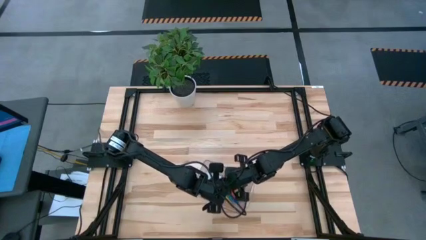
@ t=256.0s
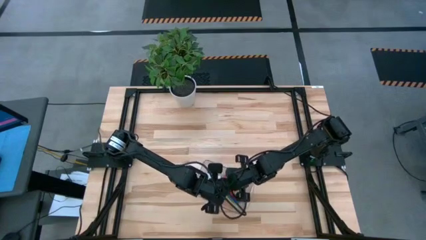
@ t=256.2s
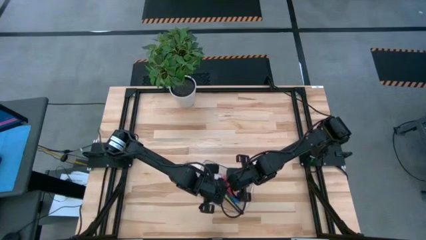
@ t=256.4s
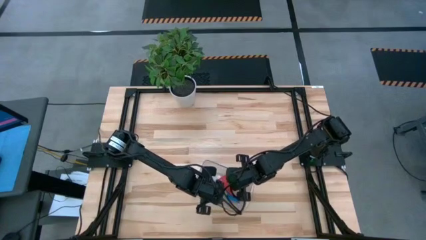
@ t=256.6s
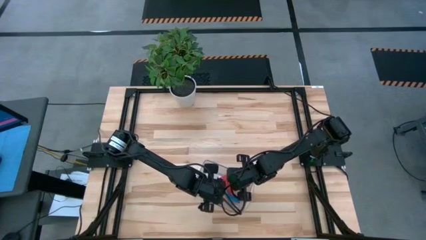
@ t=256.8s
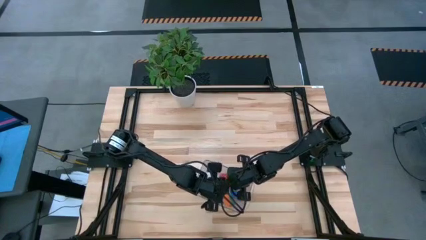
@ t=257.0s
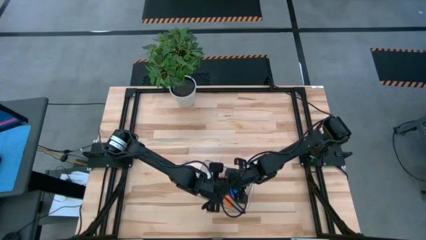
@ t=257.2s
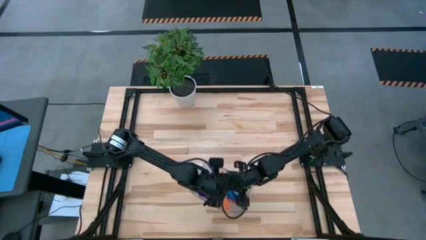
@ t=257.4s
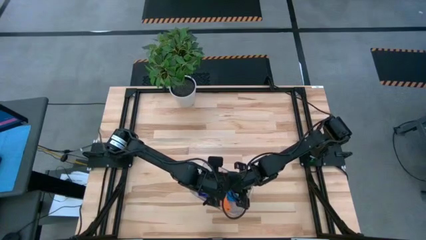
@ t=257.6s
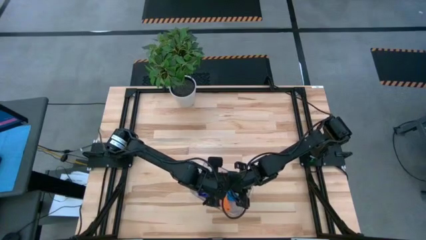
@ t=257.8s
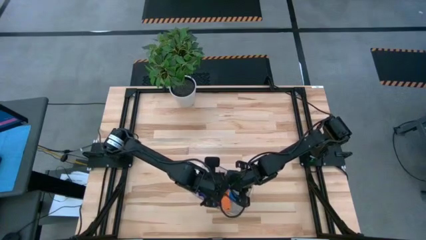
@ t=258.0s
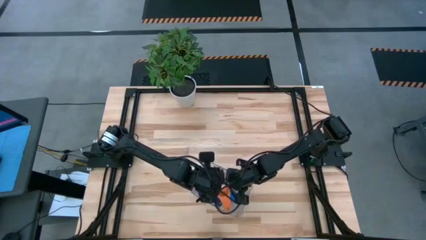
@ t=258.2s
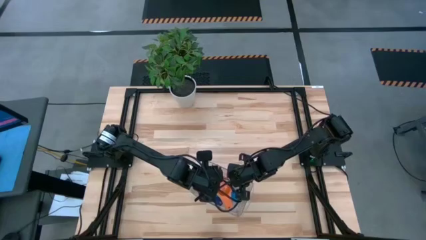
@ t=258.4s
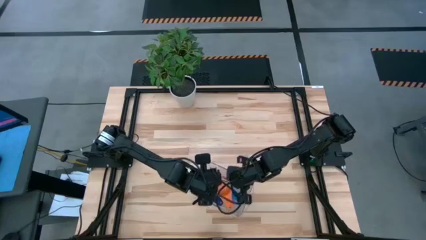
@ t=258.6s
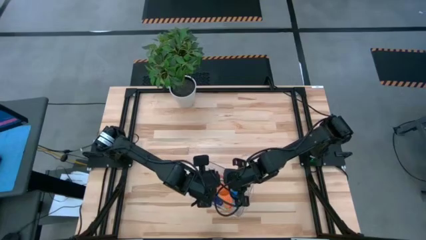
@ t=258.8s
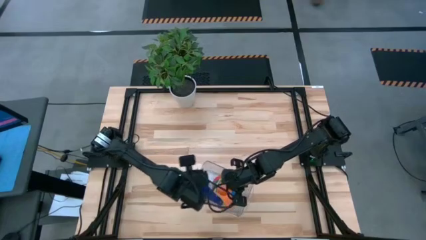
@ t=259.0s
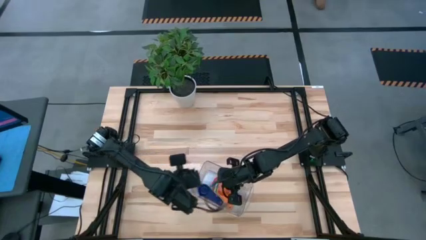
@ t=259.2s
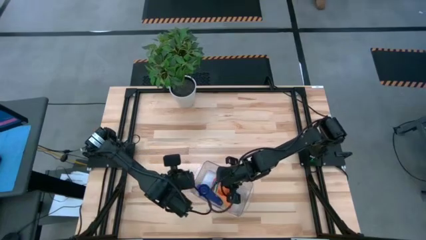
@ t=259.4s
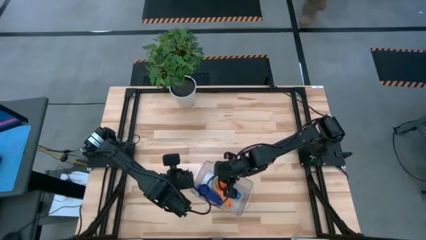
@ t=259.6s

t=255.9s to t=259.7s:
Task: Nest measuring cups in basket
Put the colored stacked measuring cups into the transparent bin

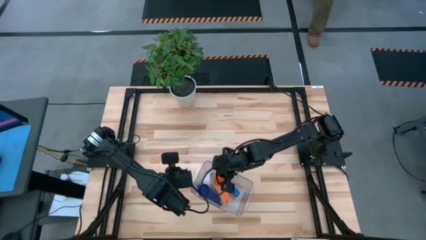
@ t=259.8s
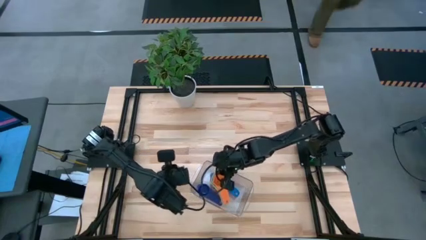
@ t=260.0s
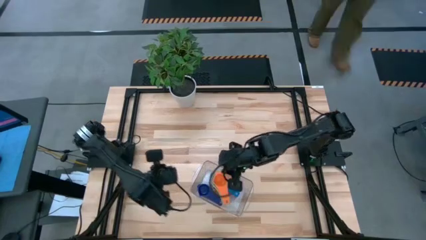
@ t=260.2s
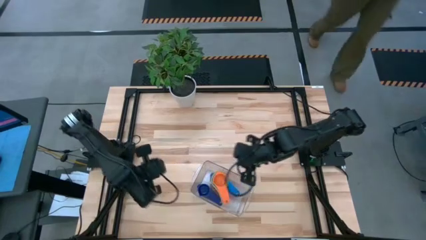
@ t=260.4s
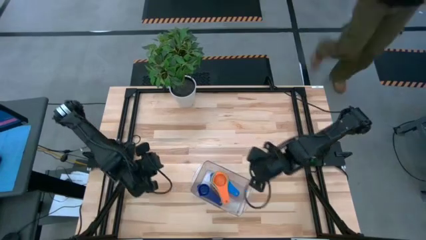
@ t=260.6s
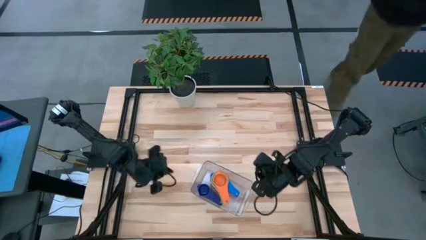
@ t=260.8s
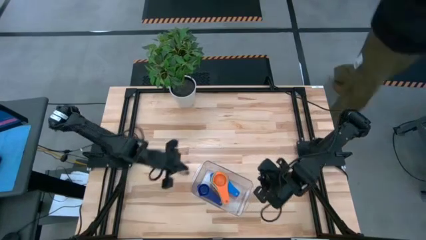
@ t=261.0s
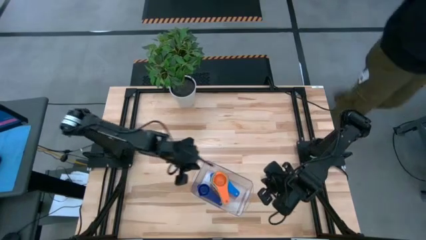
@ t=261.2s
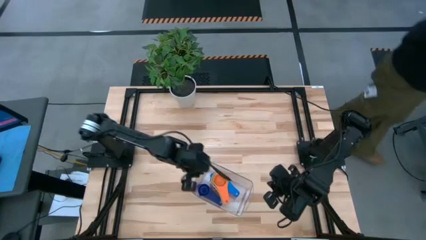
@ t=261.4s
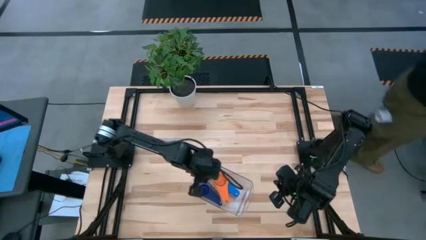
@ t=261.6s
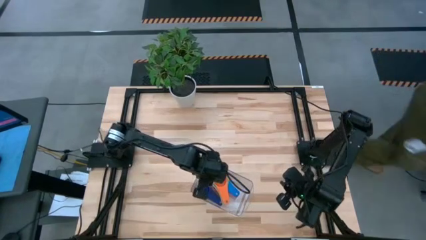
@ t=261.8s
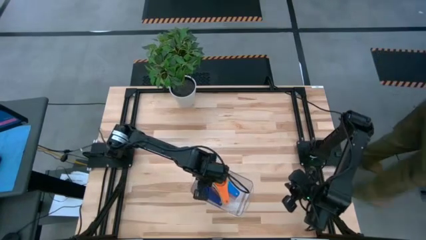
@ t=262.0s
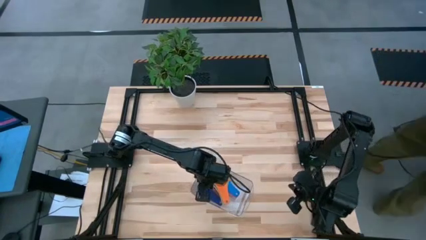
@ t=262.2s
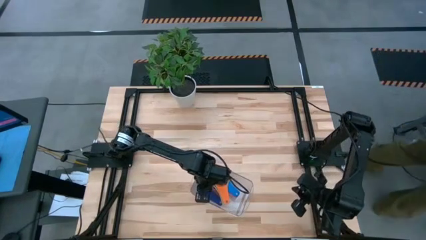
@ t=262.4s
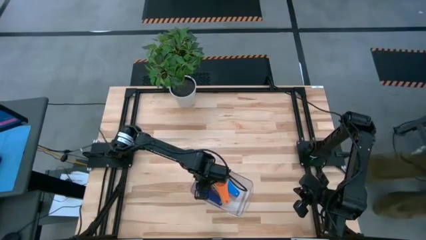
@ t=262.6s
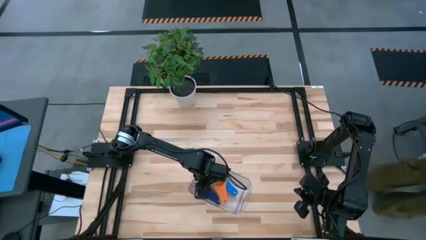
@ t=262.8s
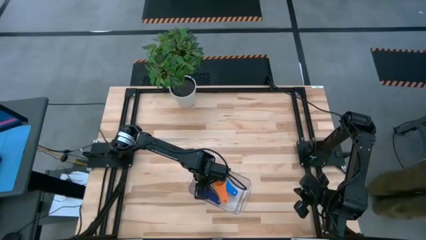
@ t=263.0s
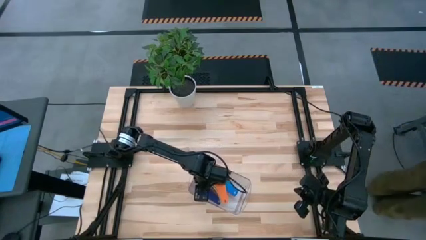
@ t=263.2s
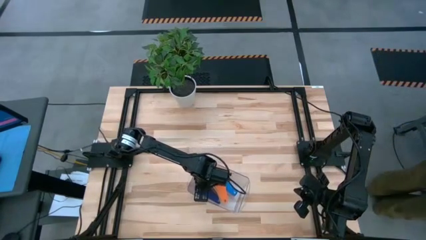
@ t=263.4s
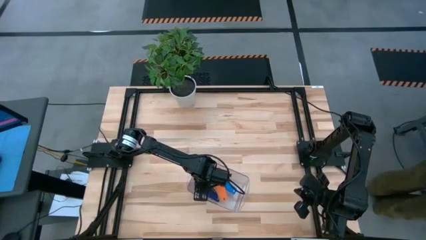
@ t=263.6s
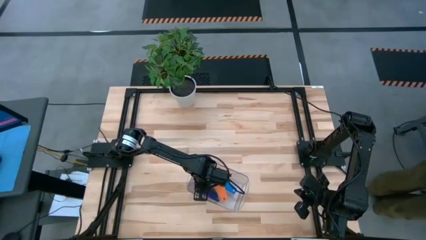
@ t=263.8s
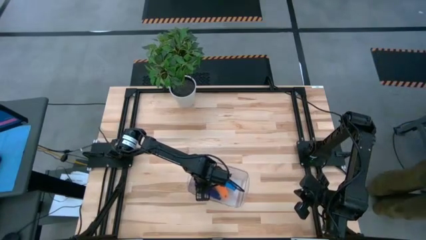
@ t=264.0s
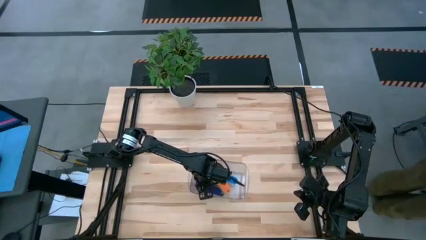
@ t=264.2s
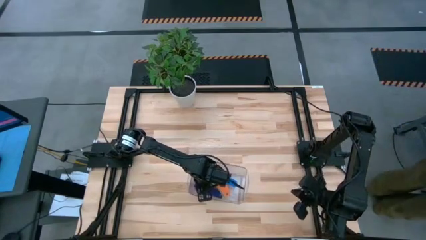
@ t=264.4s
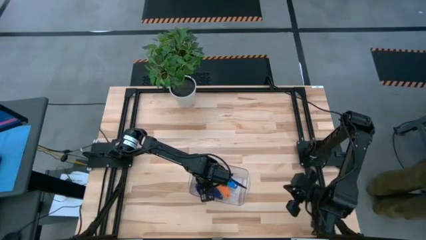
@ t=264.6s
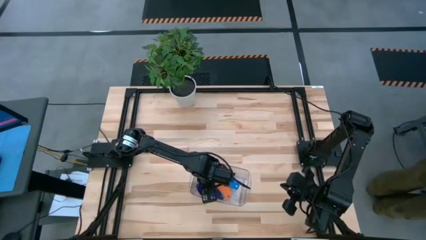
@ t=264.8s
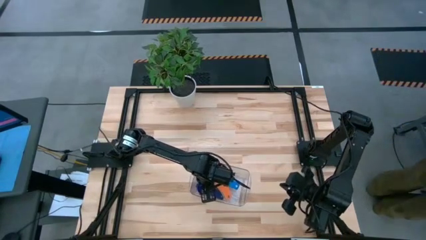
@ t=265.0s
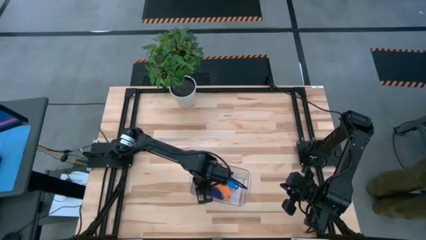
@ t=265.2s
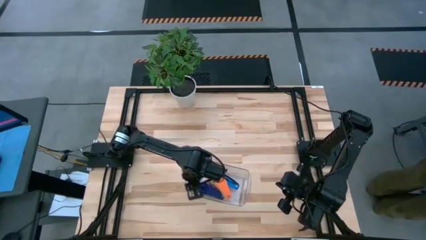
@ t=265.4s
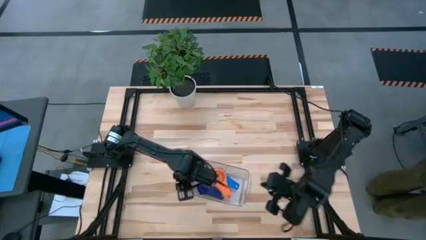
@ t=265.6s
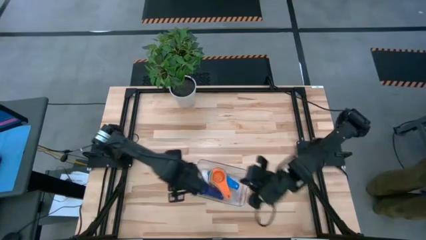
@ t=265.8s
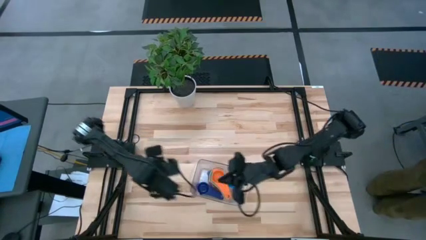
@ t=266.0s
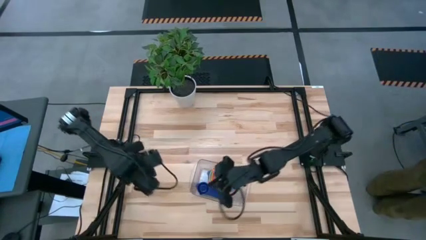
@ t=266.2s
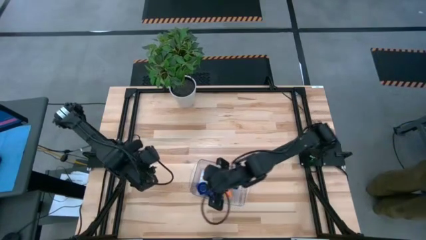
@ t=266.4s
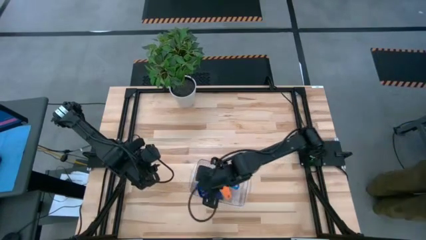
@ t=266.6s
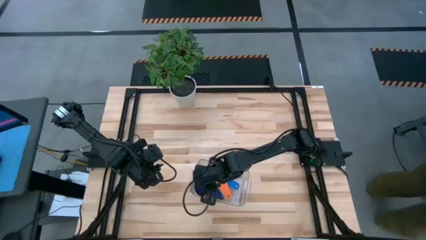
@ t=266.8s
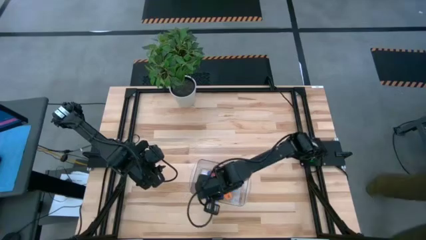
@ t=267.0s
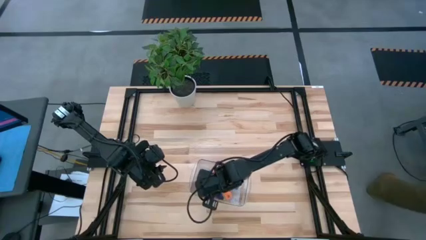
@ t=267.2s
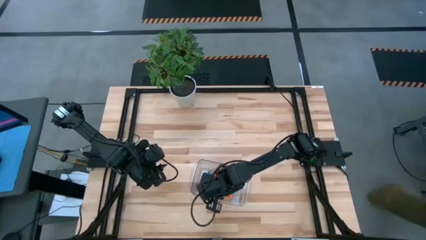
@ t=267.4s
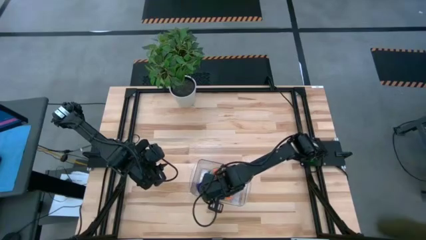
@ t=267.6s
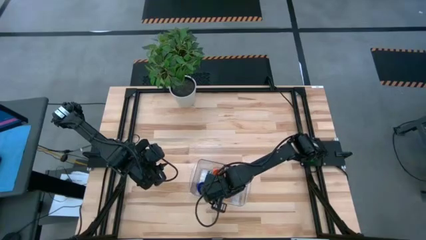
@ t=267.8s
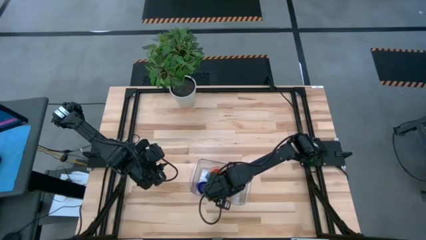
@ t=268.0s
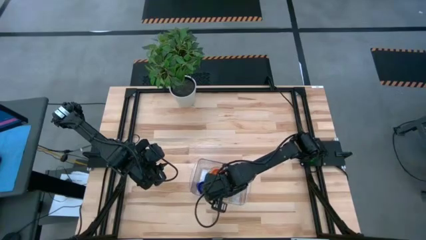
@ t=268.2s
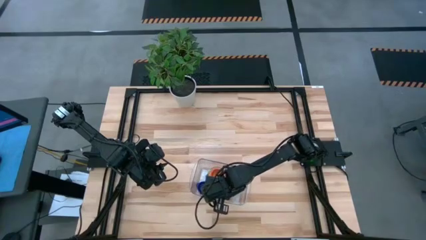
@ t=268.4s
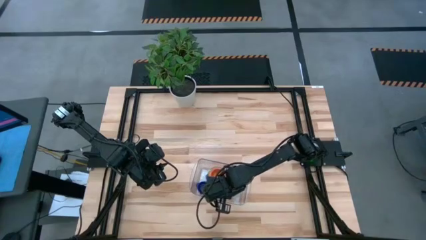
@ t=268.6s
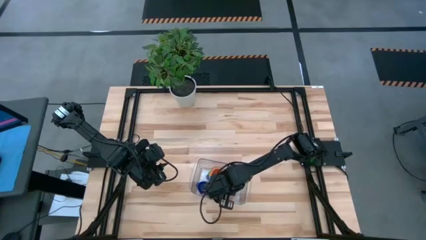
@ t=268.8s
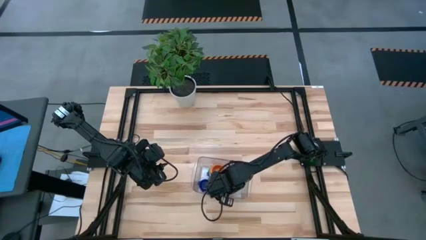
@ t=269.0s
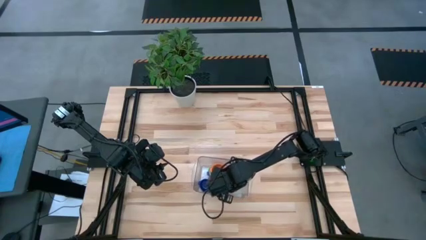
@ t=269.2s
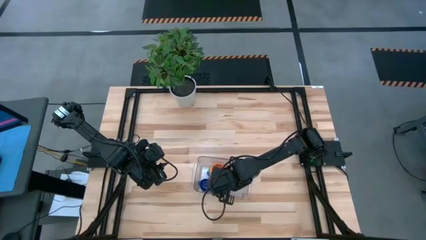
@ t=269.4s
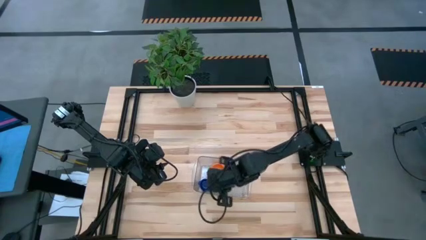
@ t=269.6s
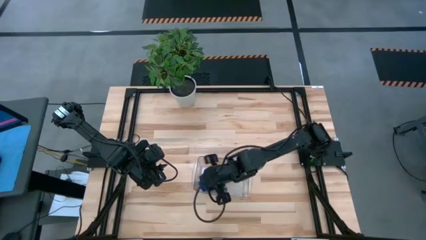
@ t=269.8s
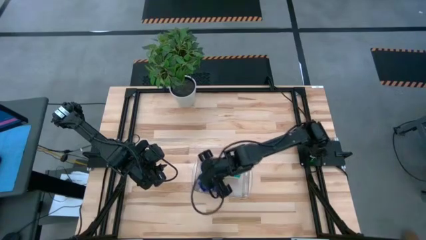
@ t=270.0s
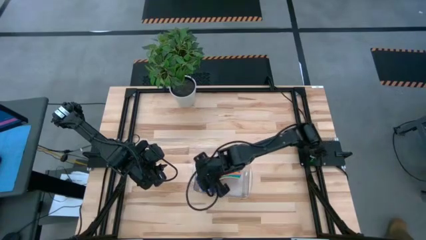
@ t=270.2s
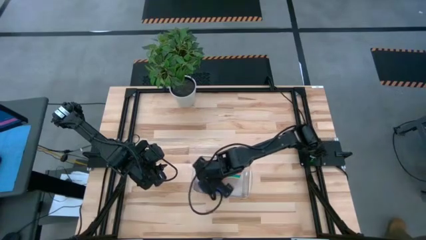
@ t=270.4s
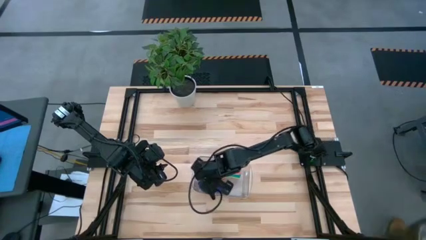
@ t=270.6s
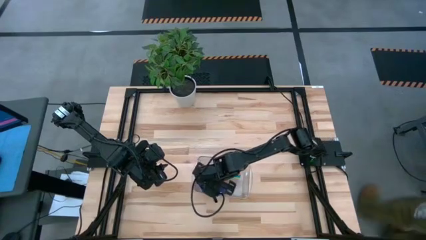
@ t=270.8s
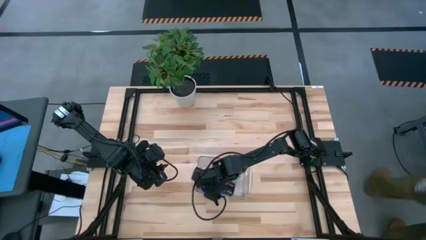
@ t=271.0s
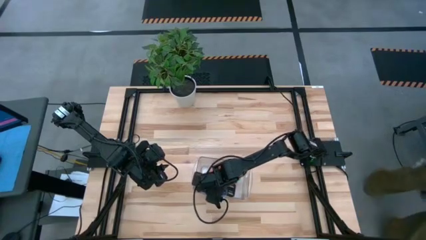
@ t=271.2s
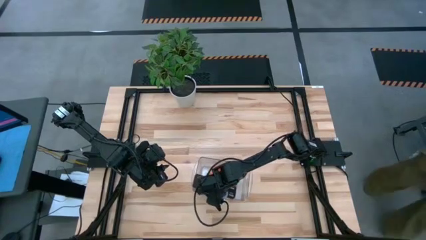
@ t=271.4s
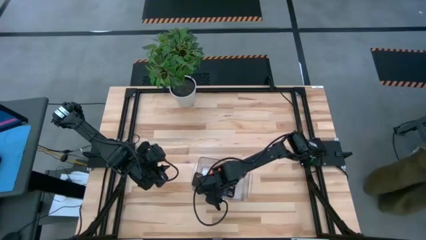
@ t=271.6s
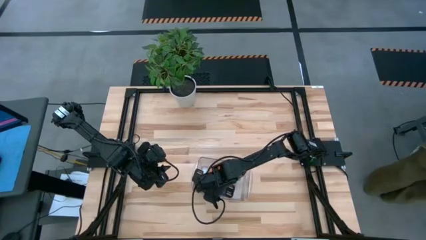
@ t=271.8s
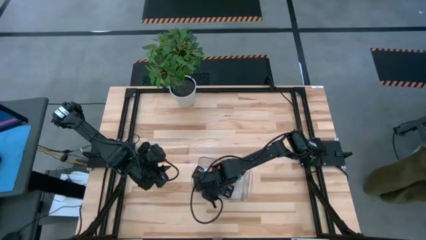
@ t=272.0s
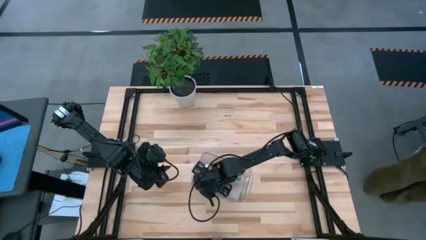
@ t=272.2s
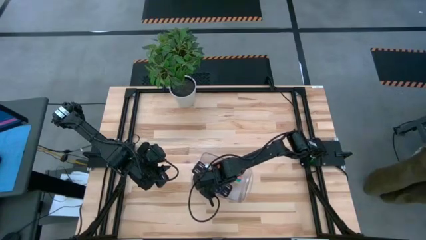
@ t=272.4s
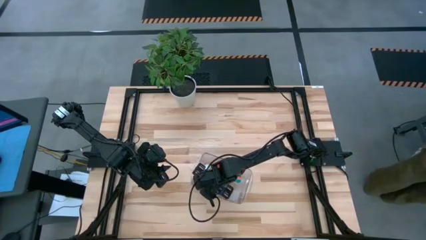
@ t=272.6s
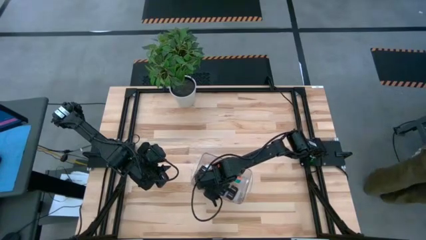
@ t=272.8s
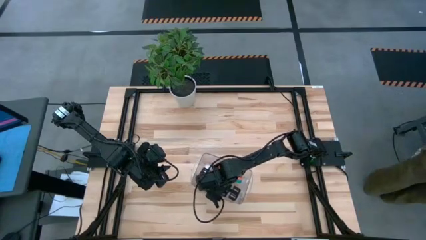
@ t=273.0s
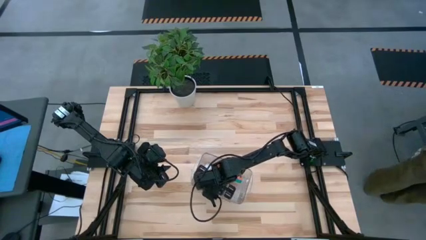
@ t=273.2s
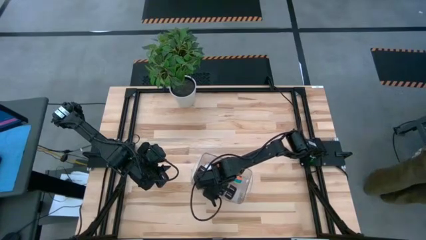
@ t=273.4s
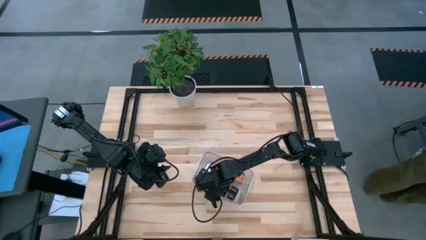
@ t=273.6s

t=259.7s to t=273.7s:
Stack the dark blue measuring cup on top of the orange measuring cup
